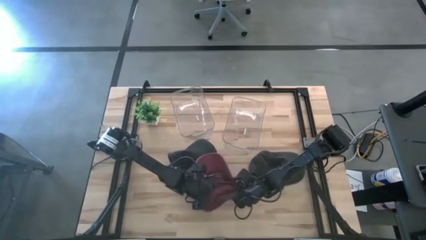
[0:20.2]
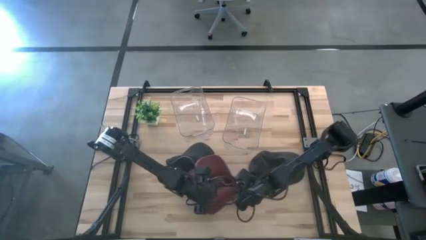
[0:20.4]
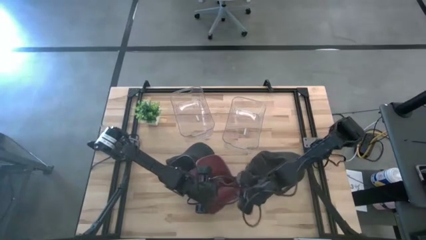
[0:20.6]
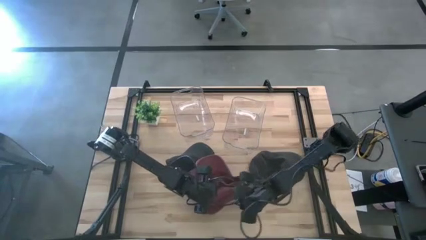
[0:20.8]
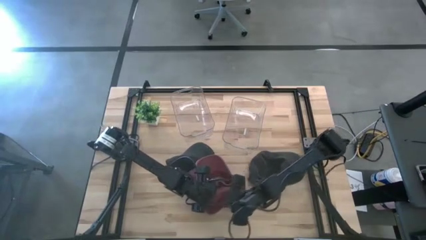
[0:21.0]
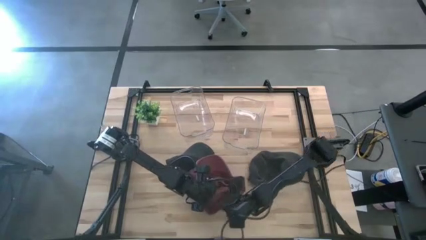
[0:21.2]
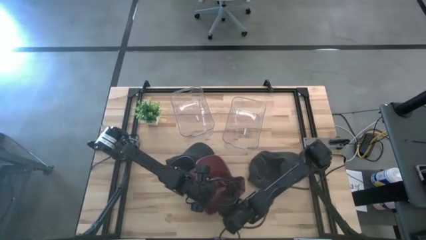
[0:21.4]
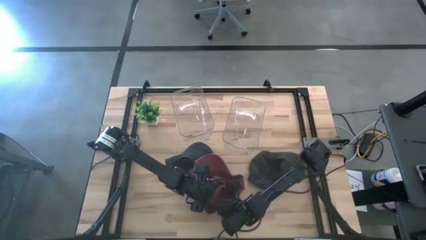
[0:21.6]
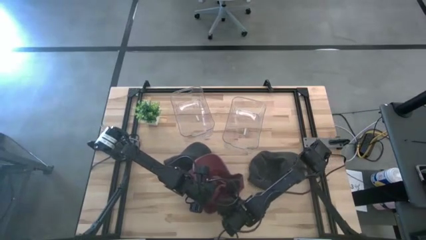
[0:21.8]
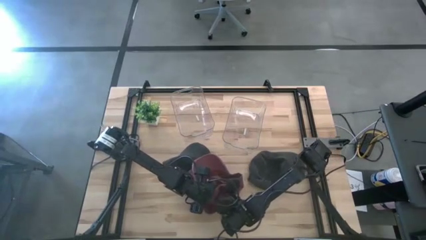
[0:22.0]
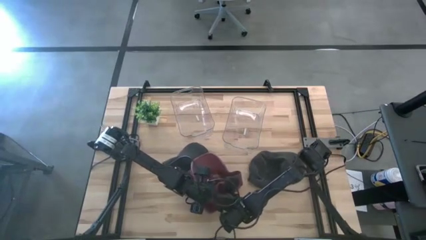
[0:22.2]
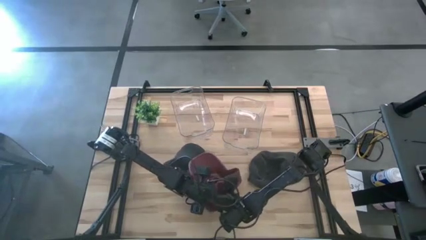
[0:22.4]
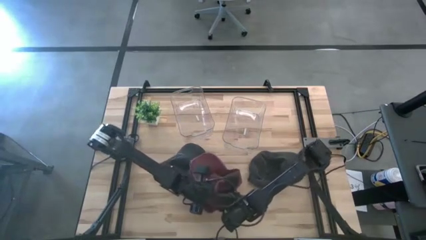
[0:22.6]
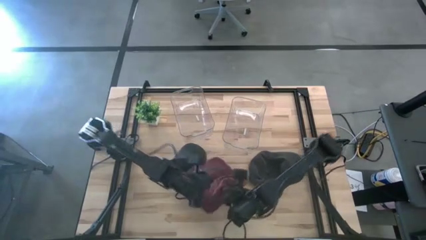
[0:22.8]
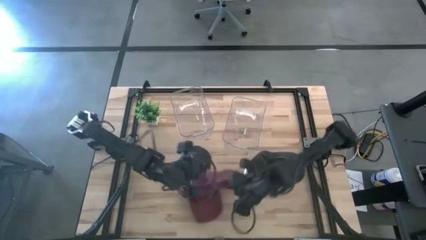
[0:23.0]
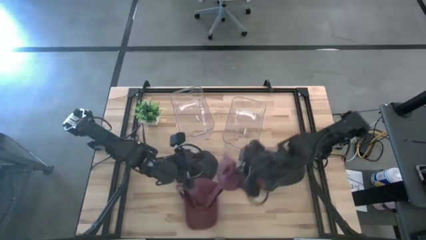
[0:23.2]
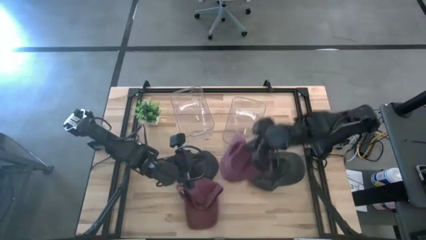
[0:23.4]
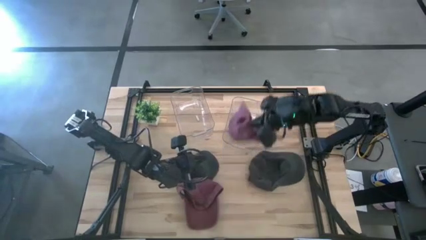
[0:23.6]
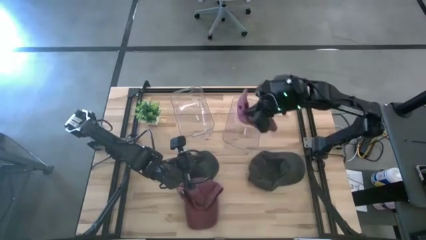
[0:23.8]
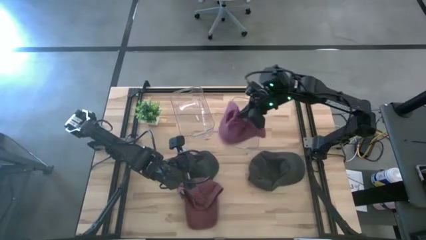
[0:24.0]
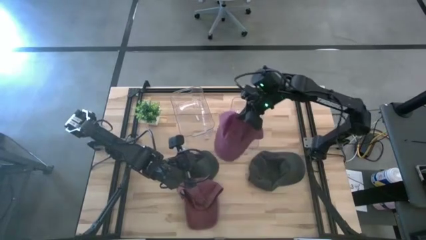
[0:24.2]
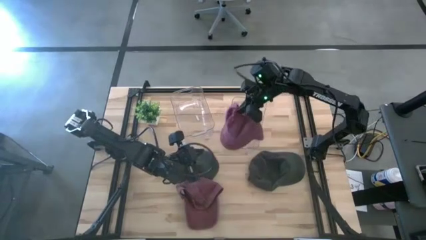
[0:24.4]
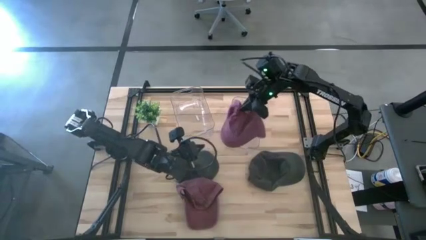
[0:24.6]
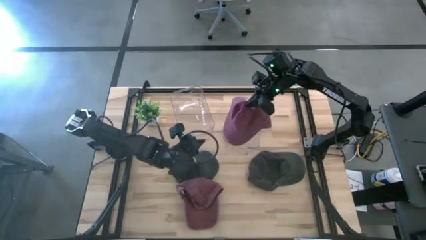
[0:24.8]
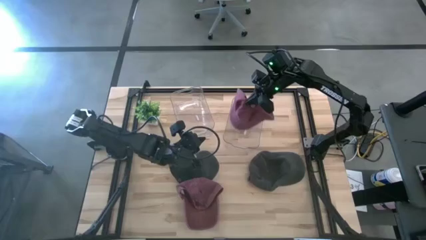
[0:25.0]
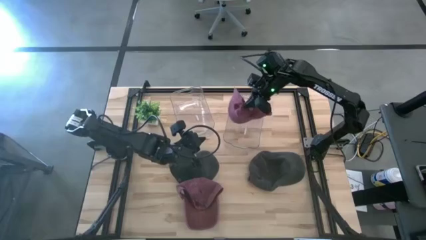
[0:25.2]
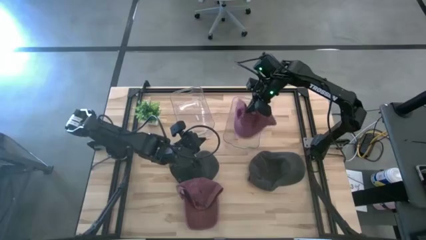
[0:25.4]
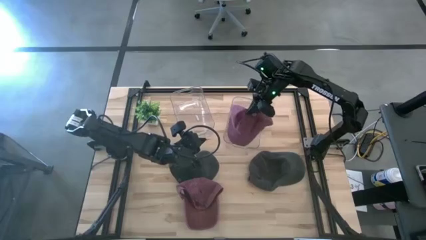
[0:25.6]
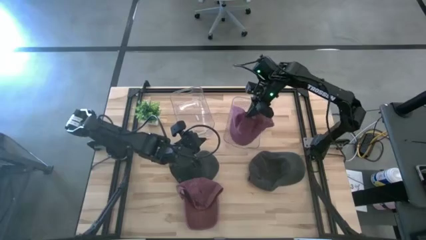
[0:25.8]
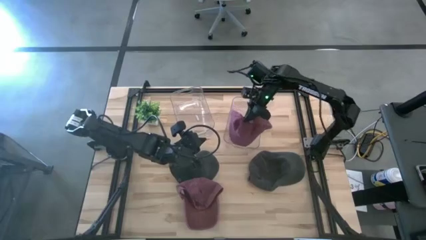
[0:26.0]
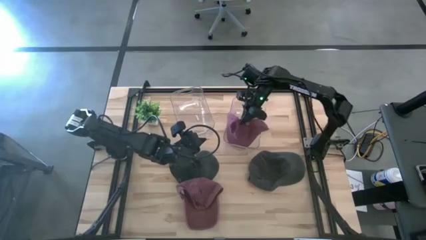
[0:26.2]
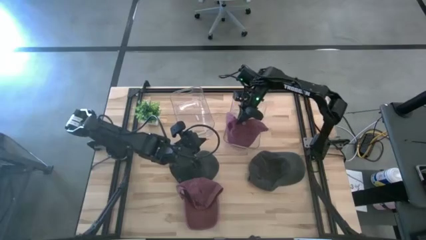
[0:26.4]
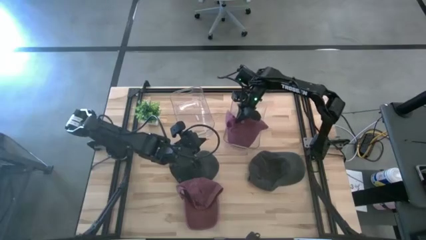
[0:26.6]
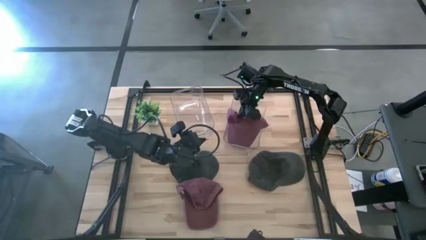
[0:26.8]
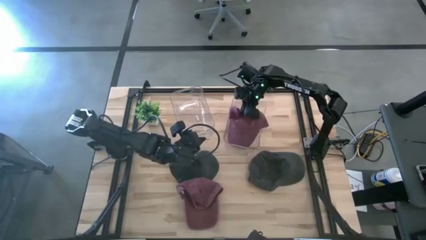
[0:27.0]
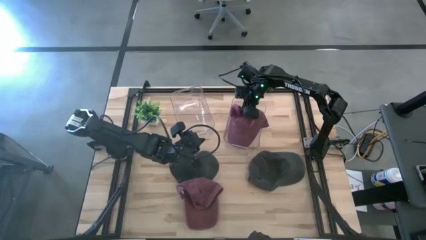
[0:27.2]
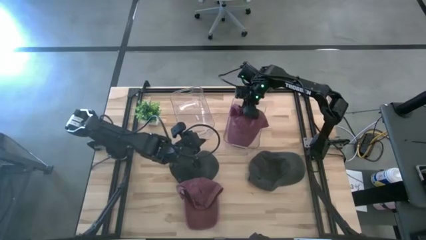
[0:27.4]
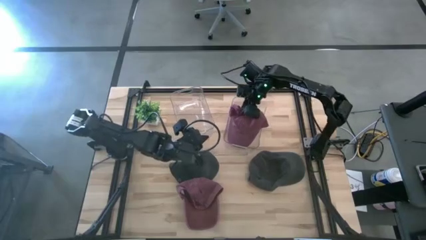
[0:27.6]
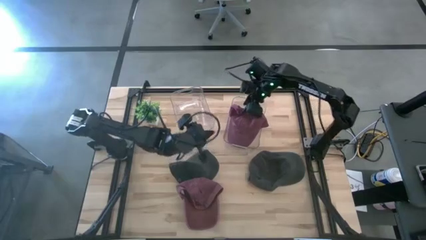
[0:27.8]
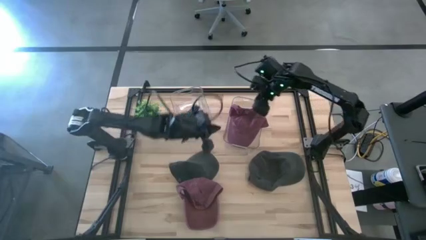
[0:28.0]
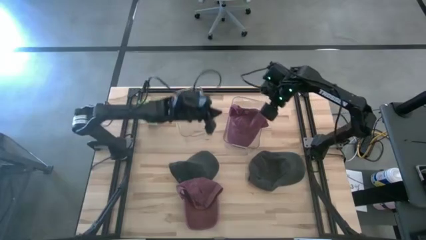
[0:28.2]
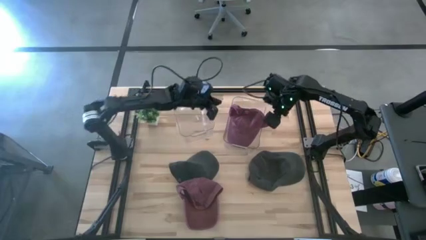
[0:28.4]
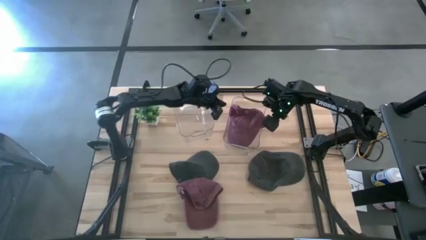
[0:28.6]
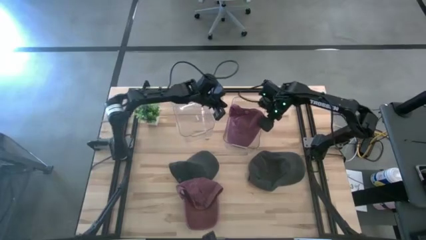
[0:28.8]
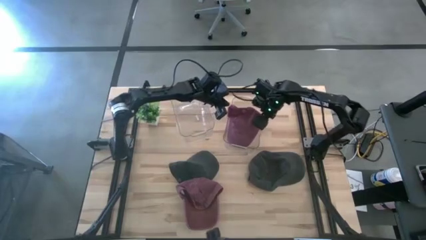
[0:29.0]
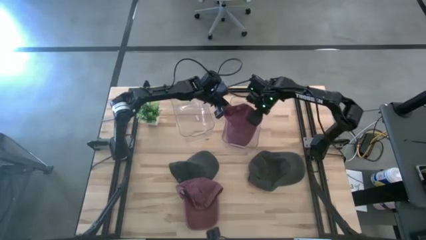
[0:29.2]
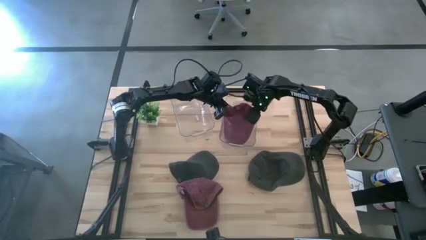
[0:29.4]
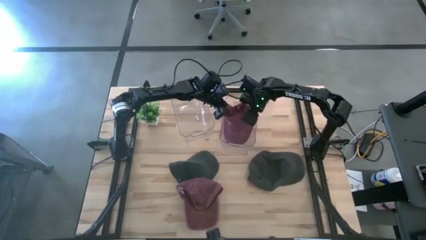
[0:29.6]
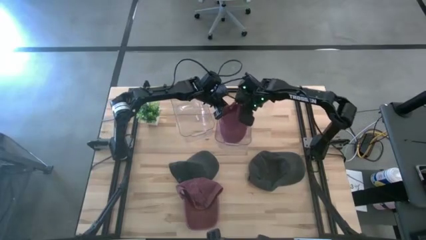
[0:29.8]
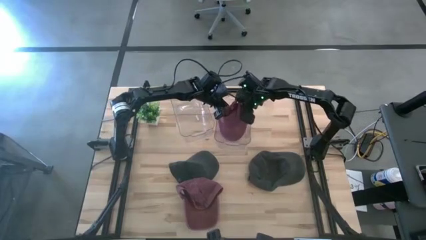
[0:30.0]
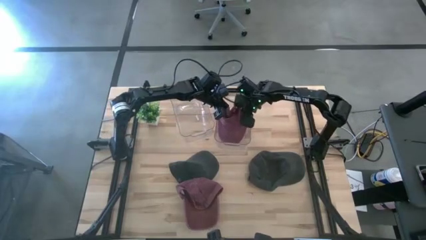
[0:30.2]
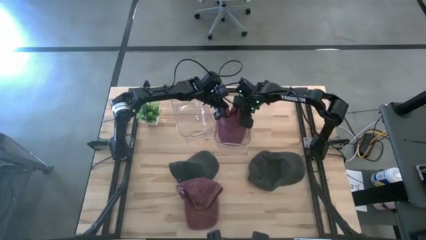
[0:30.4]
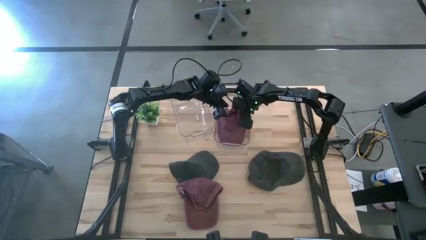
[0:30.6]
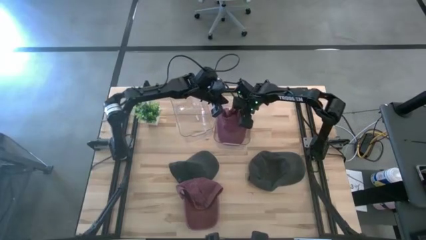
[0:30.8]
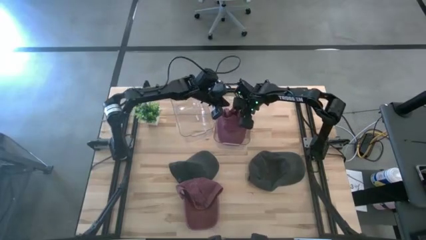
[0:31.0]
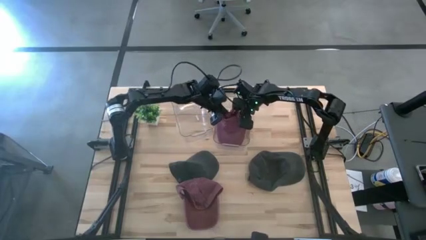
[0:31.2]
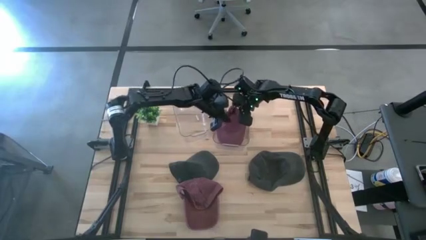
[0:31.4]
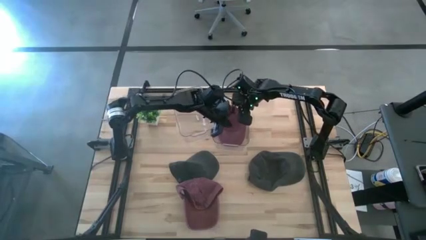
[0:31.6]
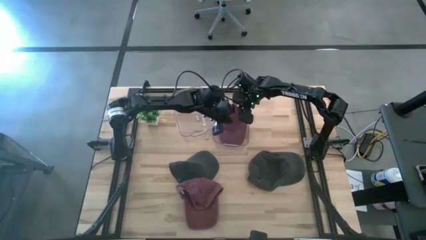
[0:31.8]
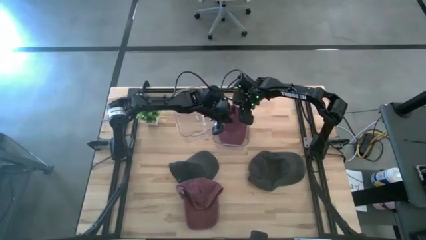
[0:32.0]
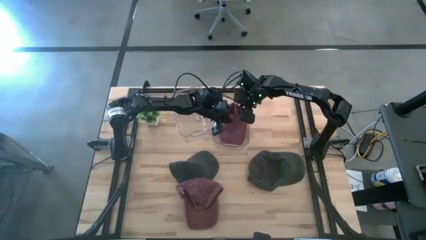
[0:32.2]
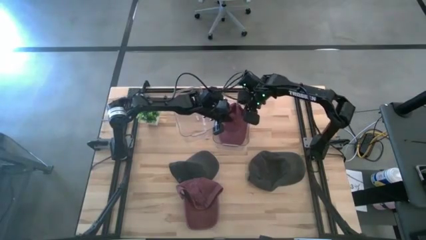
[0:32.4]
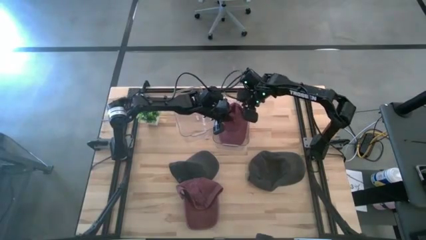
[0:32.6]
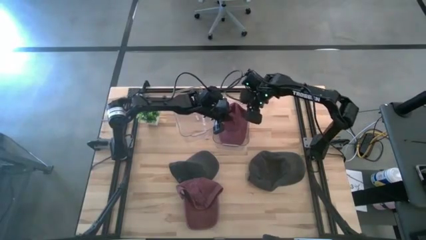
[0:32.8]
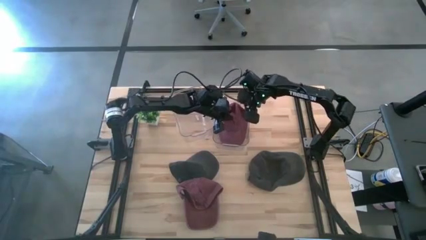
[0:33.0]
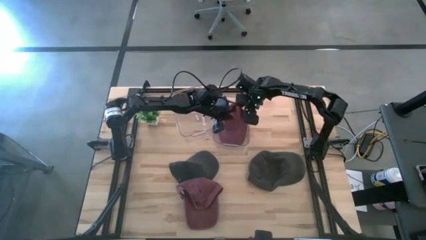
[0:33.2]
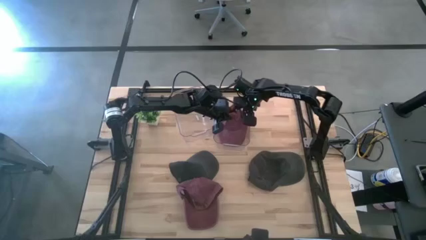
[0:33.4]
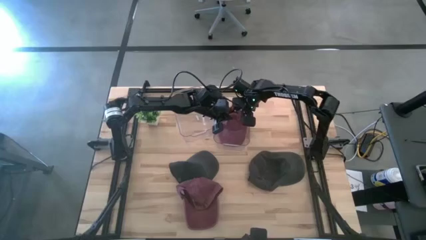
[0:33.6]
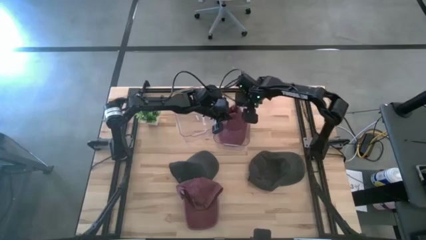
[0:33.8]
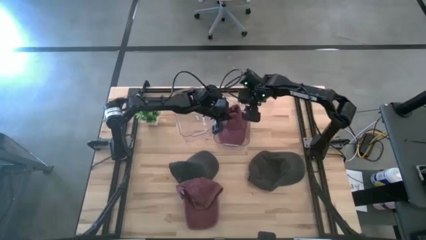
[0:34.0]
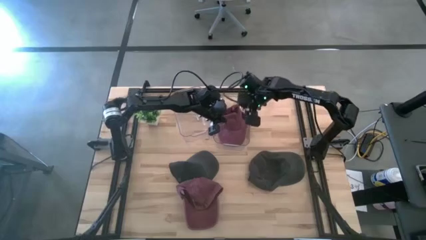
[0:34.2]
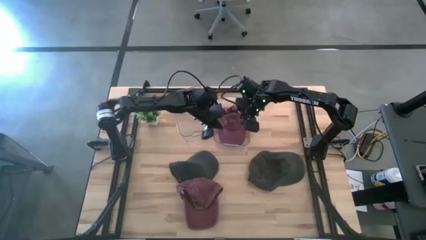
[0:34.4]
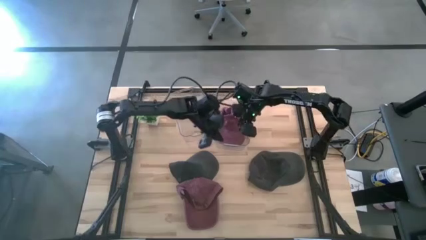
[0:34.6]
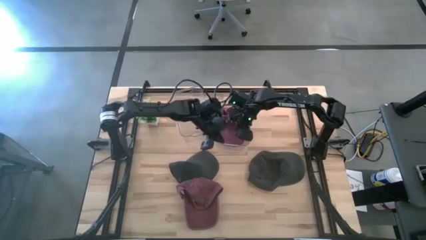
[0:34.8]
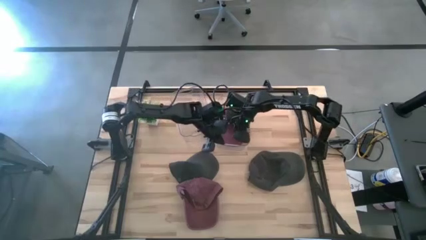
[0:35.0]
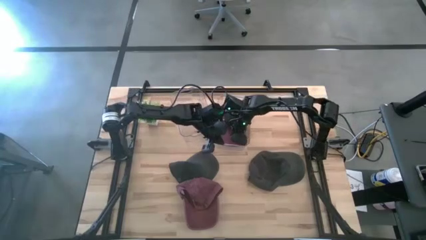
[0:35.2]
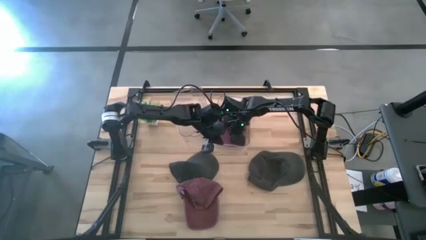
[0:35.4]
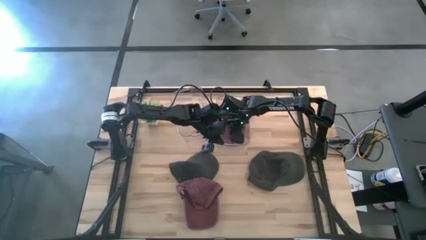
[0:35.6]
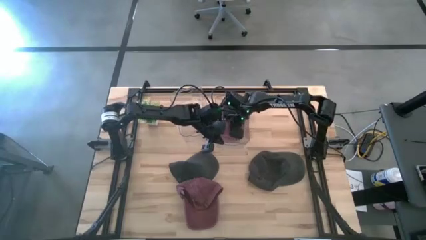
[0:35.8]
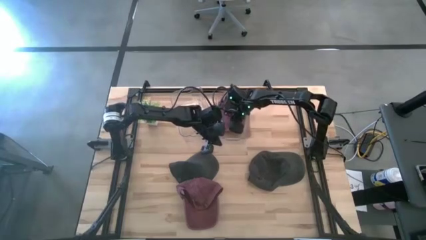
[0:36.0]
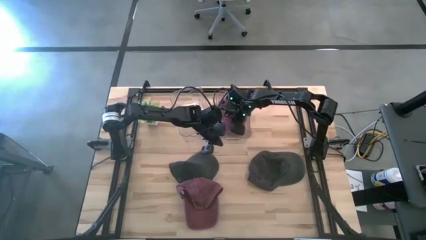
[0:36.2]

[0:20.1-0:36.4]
Task: Pick & Place hat
Put the right red cap into the right transparent bin
